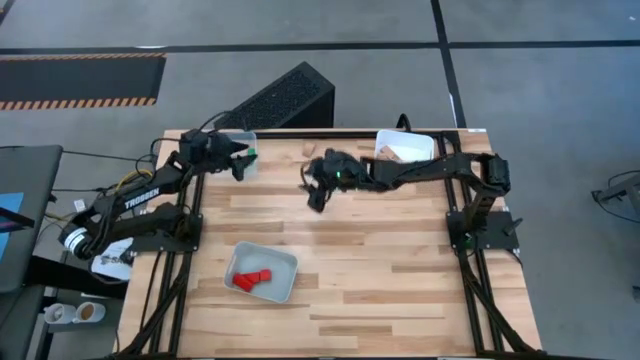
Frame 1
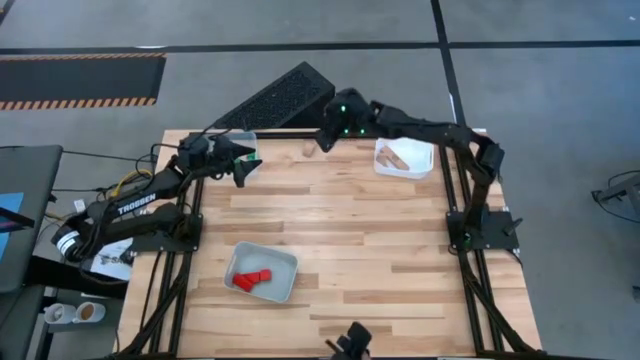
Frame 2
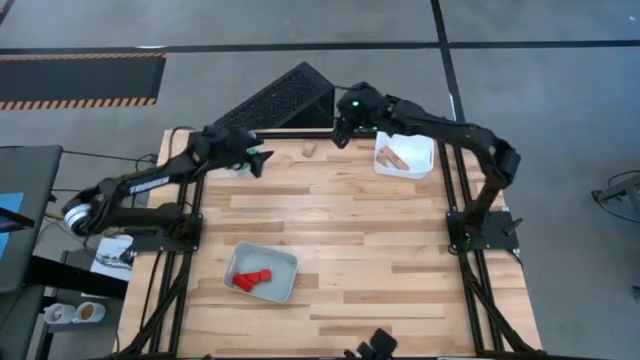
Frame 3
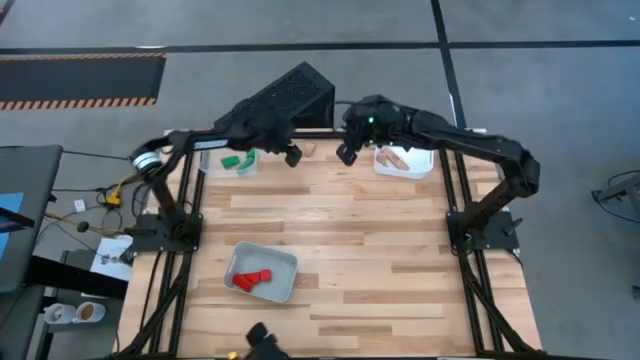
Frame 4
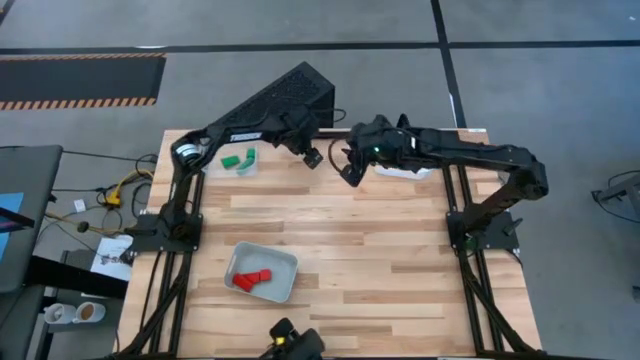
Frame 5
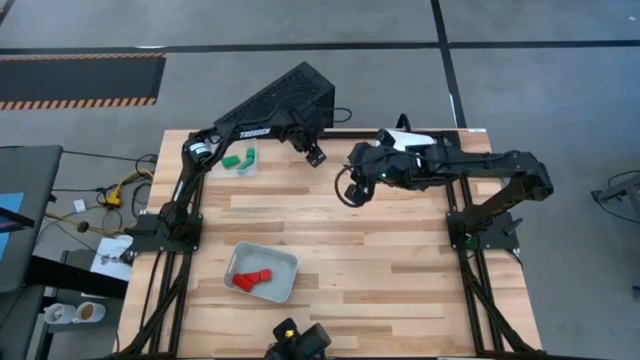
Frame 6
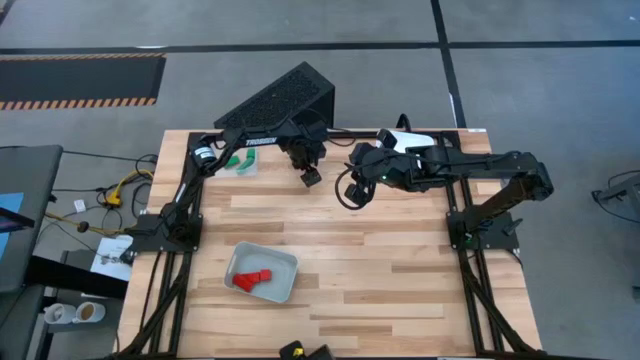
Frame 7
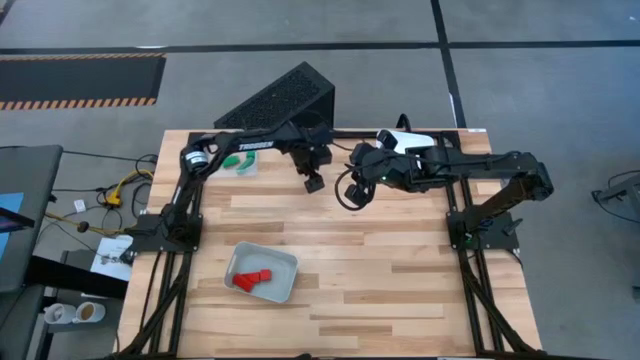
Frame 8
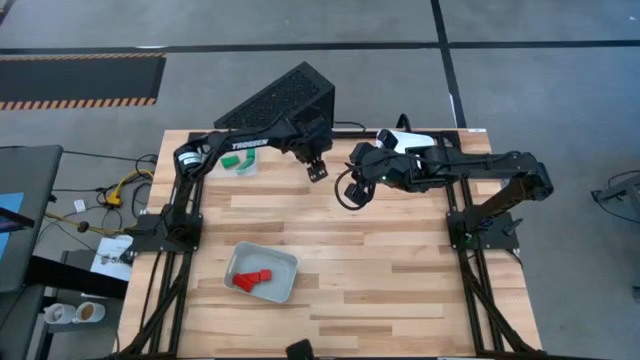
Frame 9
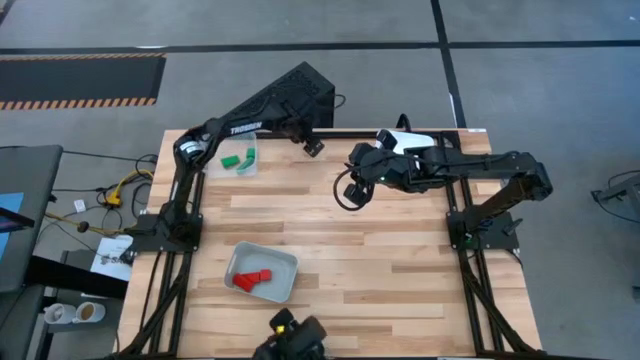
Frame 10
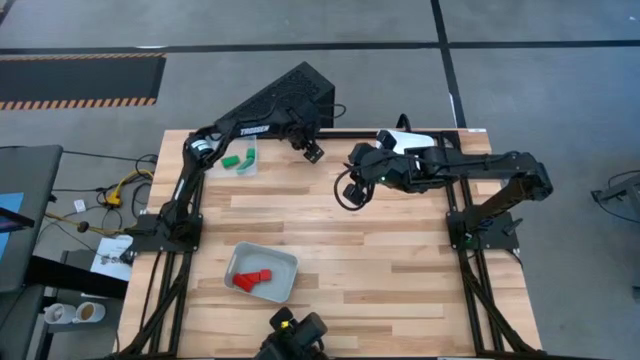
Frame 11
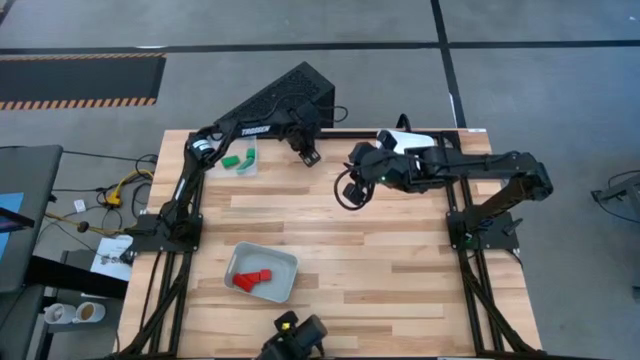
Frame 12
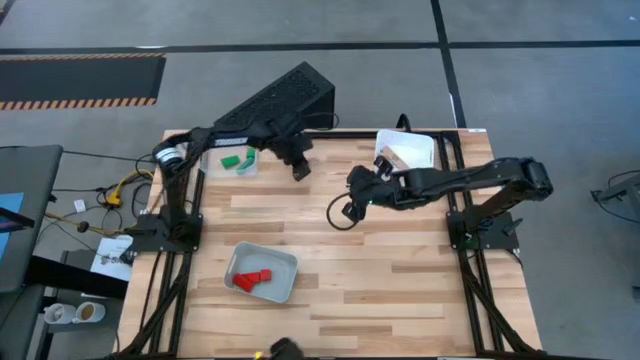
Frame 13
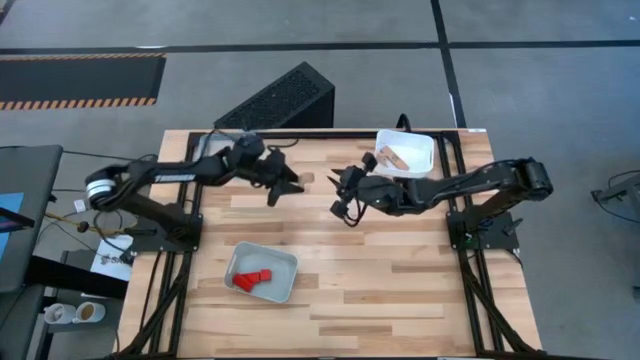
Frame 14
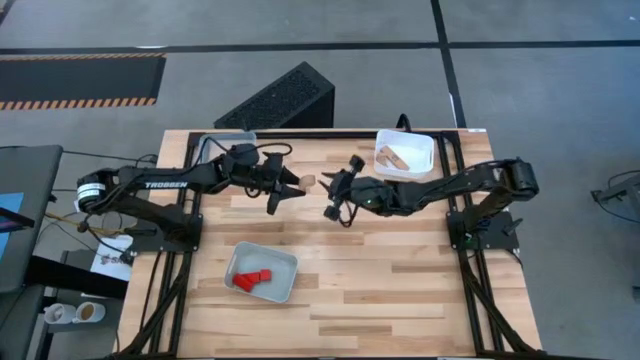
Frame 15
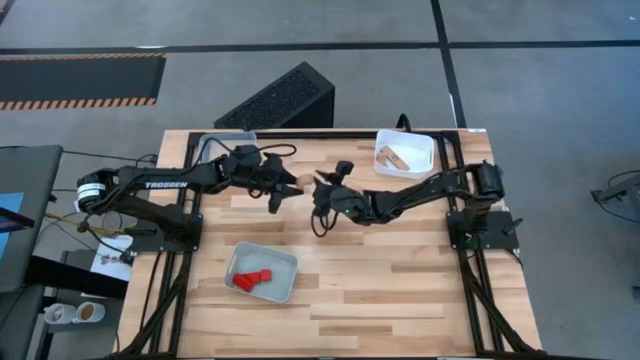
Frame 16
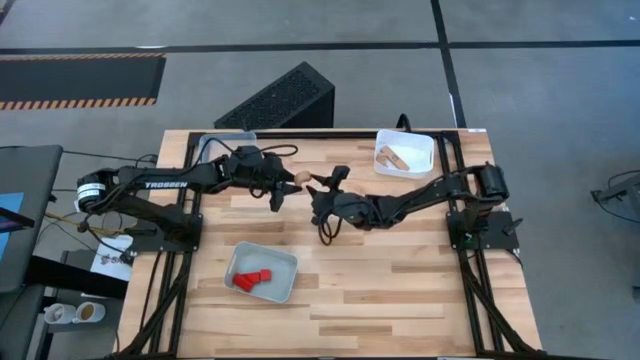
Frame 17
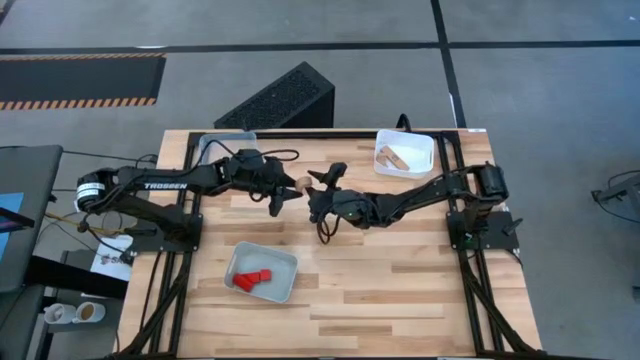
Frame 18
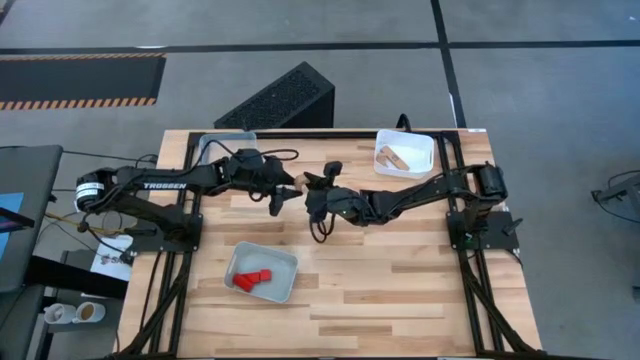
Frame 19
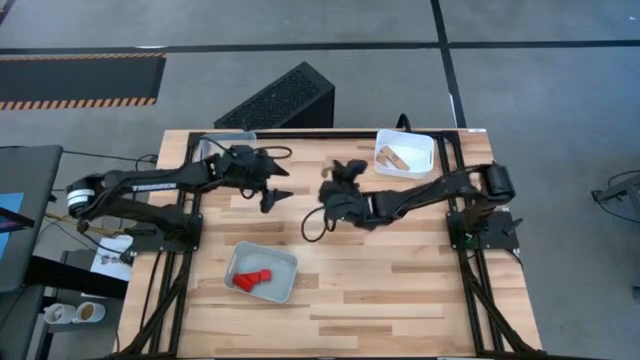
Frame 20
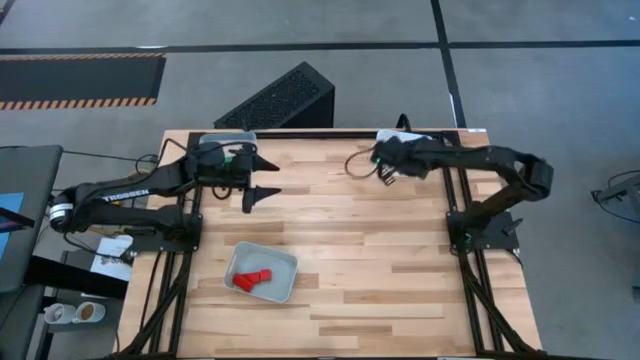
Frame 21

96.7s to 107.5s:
Task: Sort & place blocks by color
Put the brown block into the white bin

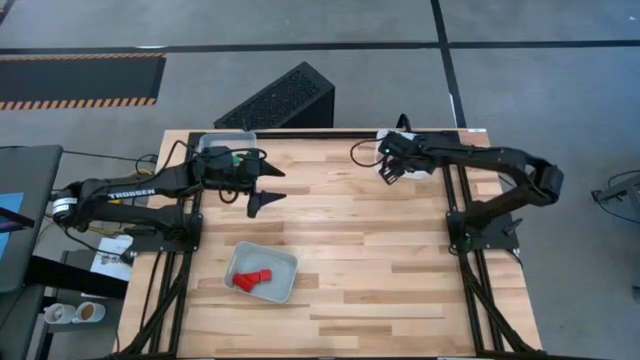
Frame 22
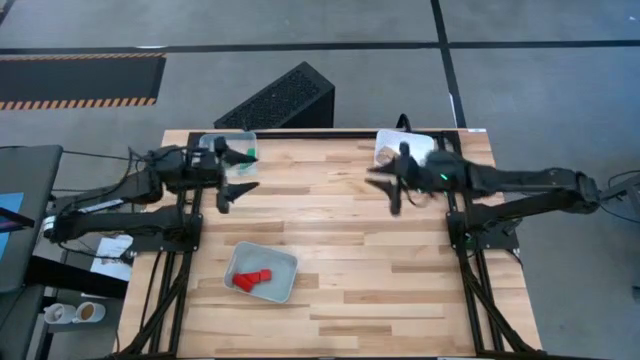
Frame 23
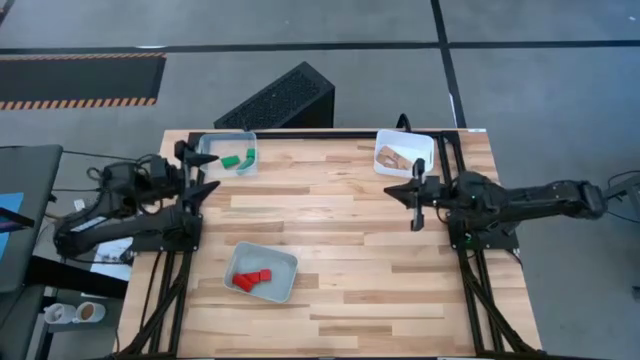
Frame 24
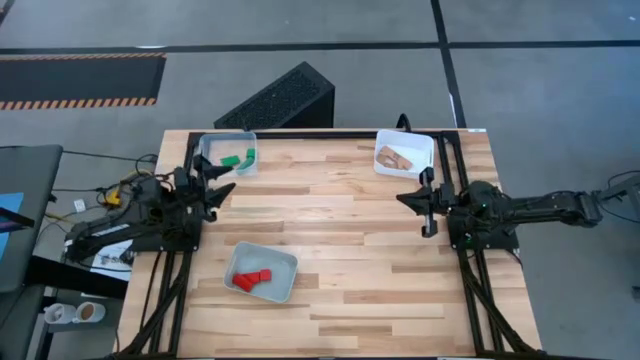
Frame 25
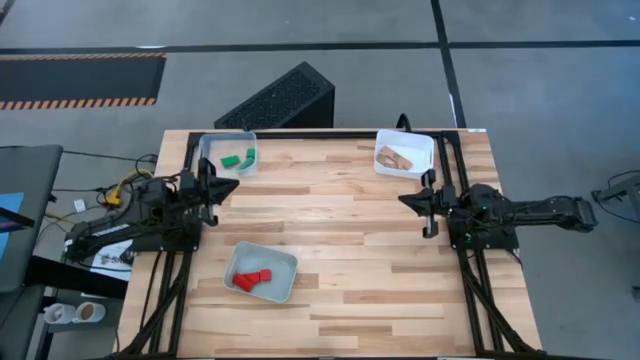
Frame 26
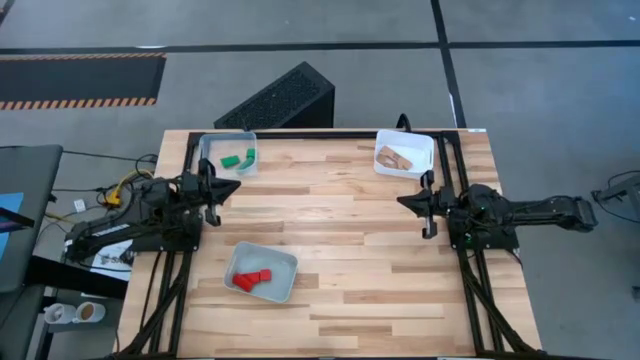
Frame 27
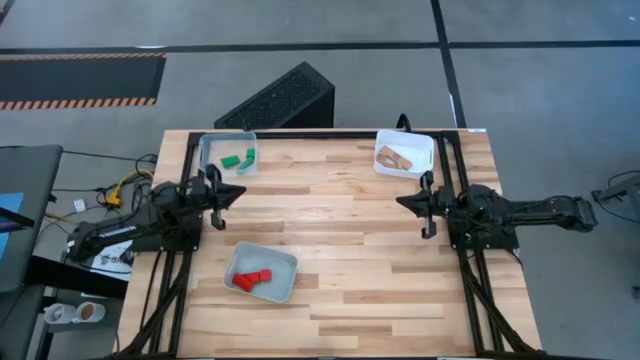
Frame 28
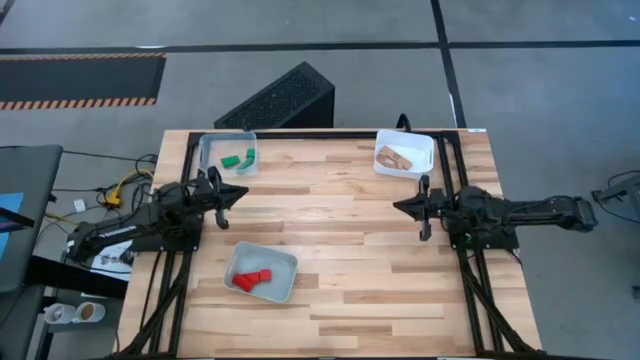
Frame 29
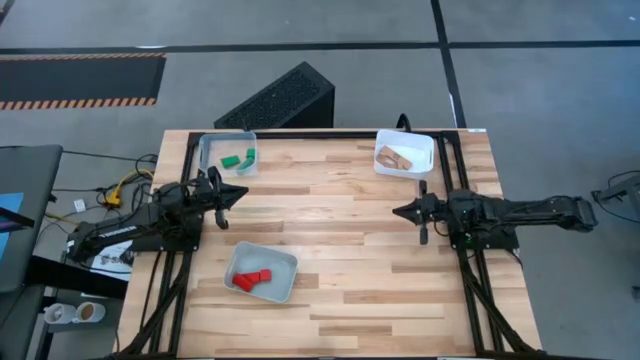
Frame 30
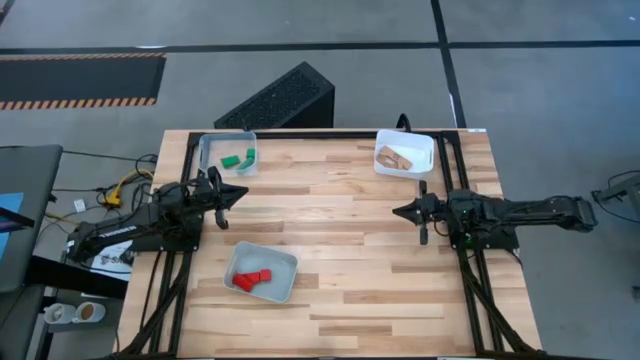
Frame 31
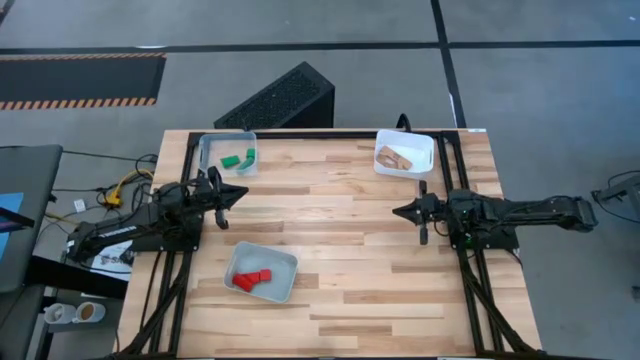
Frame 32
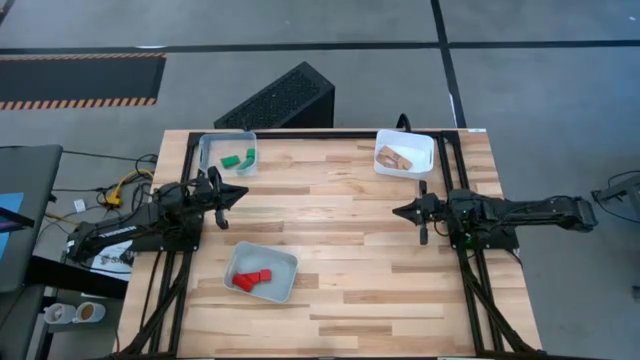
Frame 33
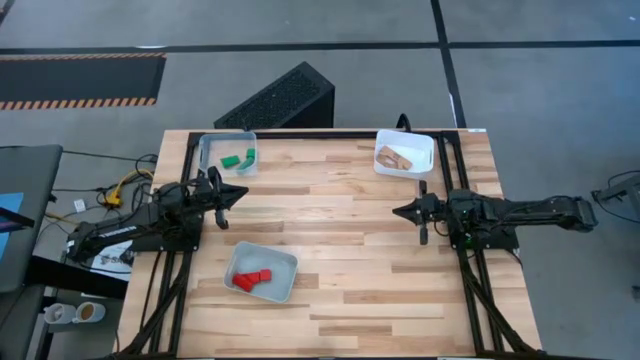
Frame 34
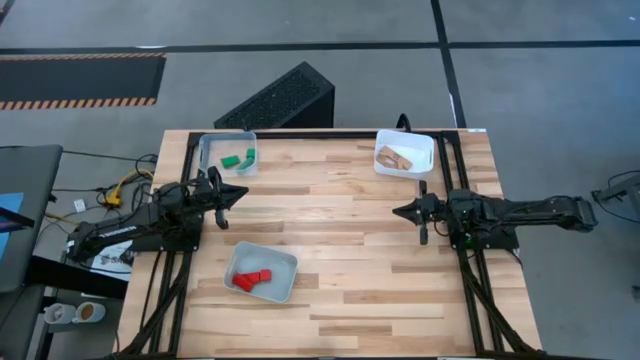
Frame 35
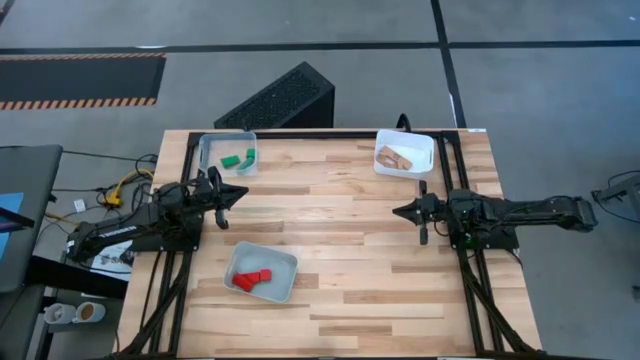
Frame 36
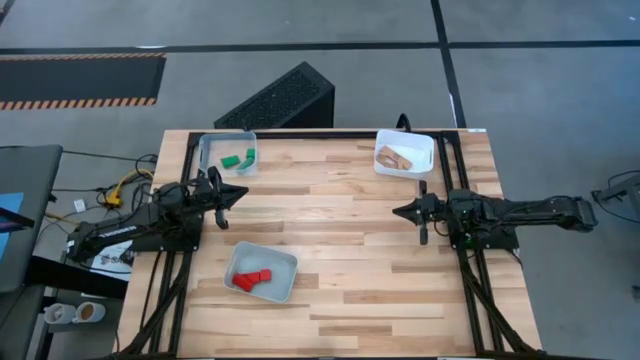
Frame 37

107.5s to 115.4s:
Return to Home Position

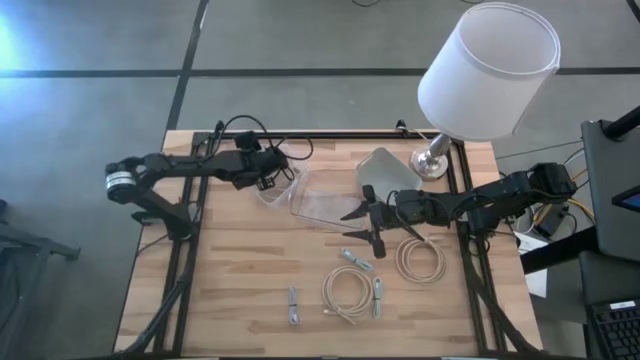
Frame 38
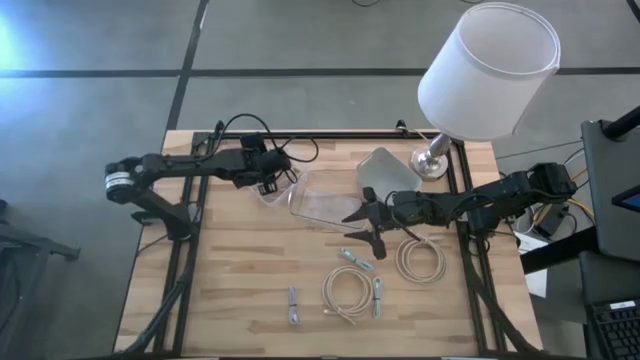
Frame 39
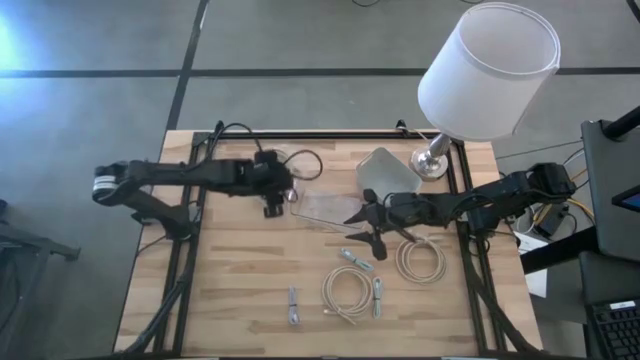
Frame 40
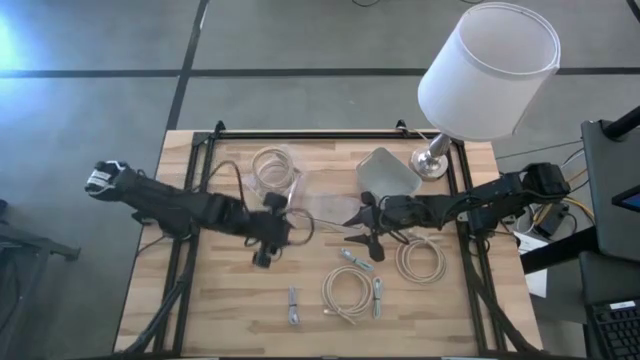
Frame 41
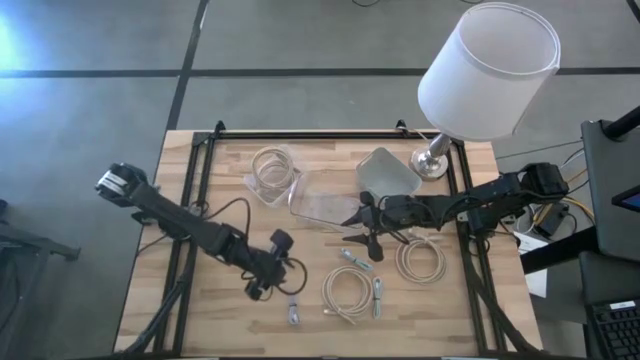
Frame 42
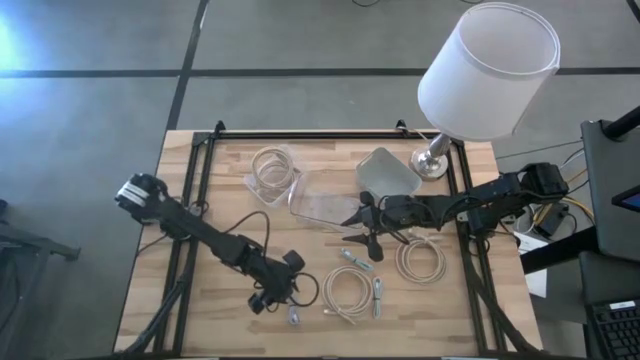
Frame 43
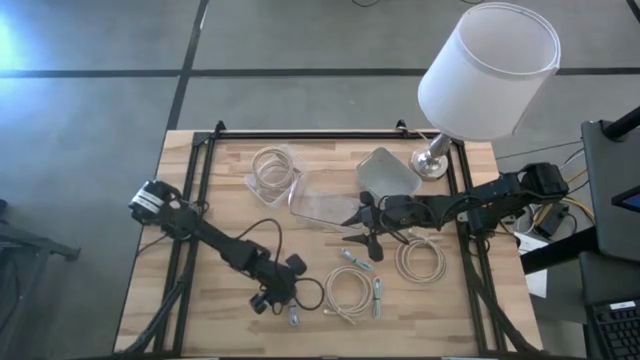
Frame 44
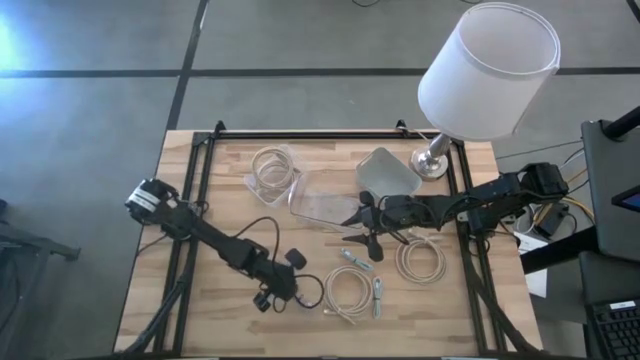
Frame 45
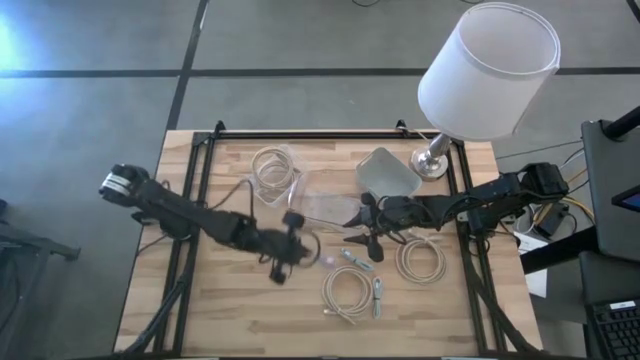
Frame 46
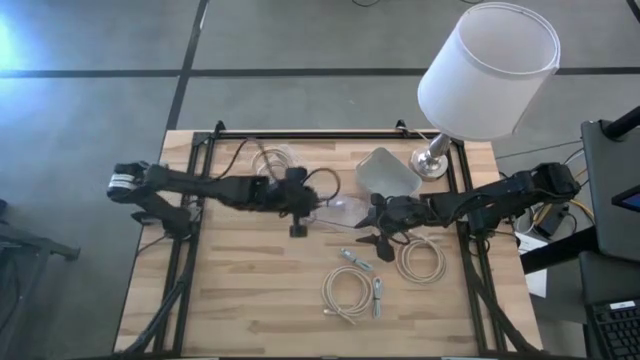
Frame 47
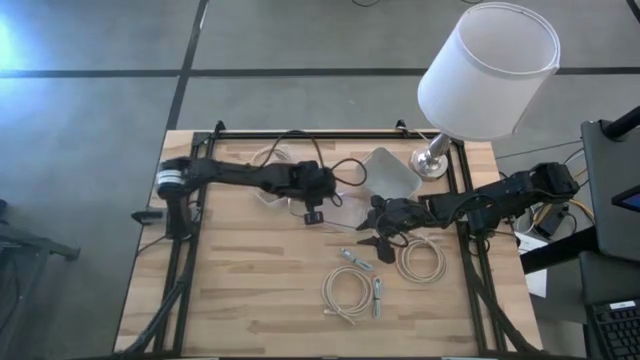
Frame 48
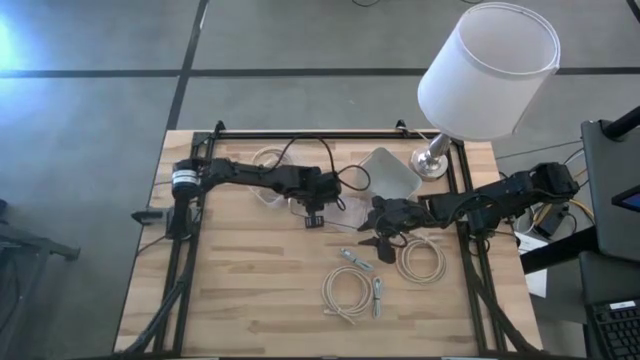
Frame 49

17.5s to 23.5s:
Task: Pick & Place USB Port
Put the purple USB cable into the transparent bin
